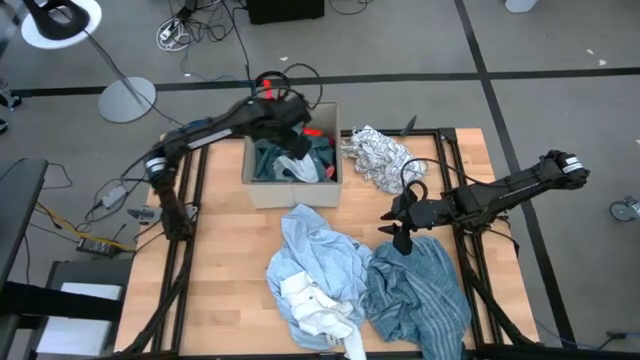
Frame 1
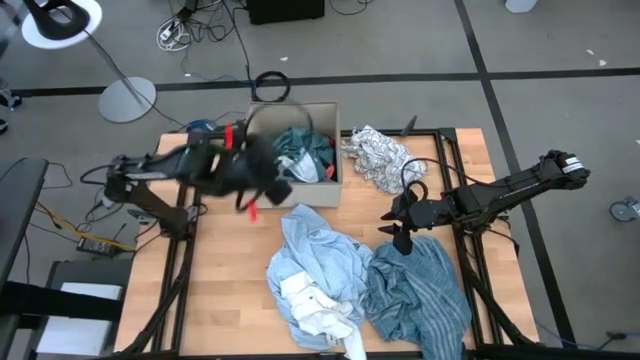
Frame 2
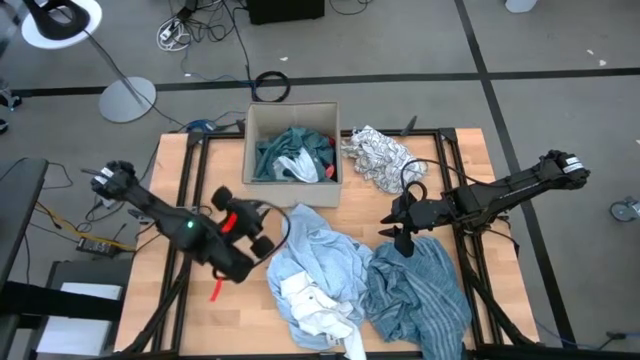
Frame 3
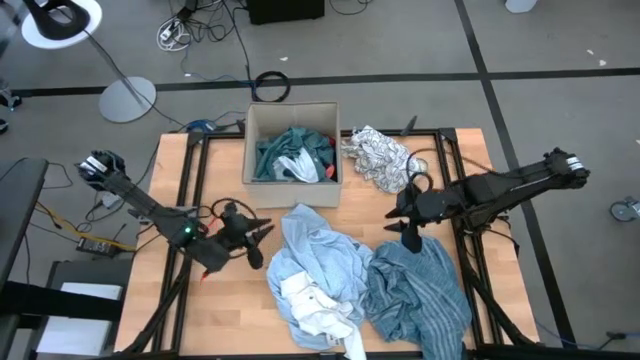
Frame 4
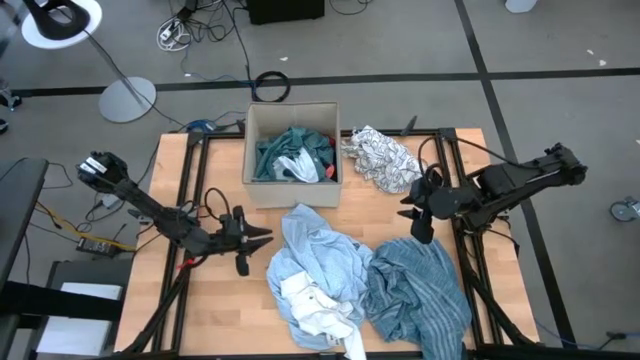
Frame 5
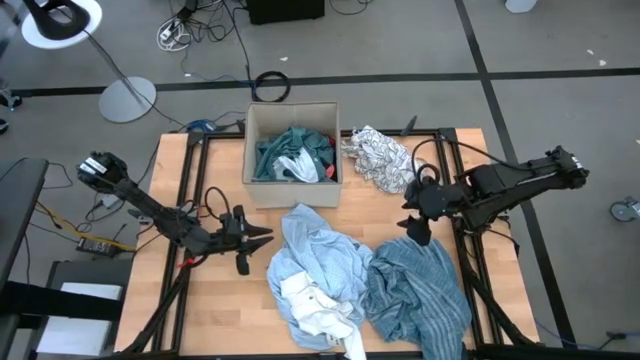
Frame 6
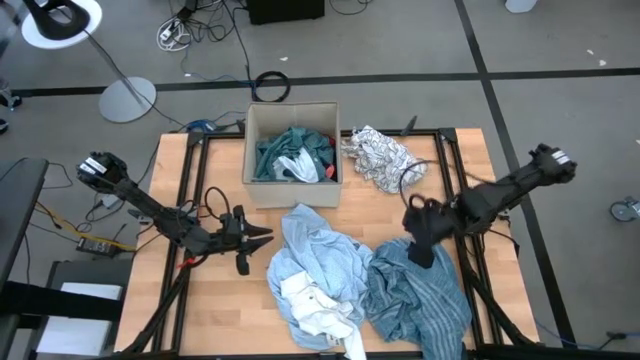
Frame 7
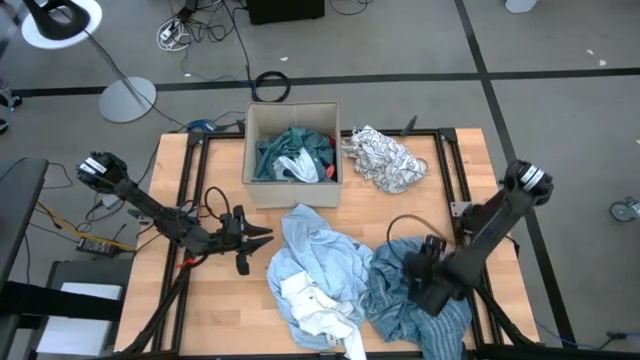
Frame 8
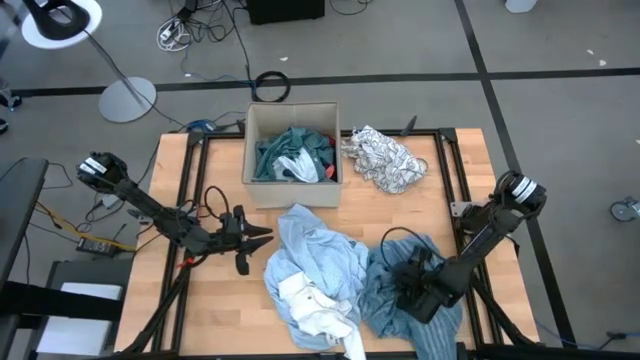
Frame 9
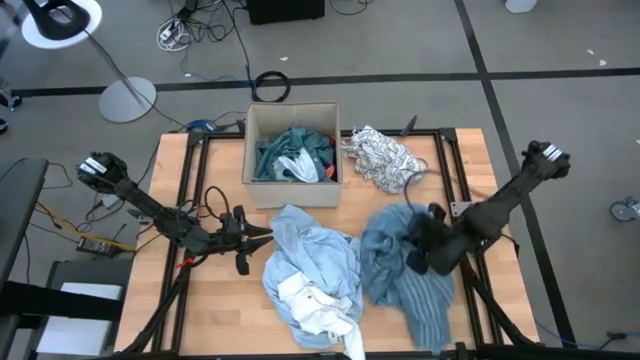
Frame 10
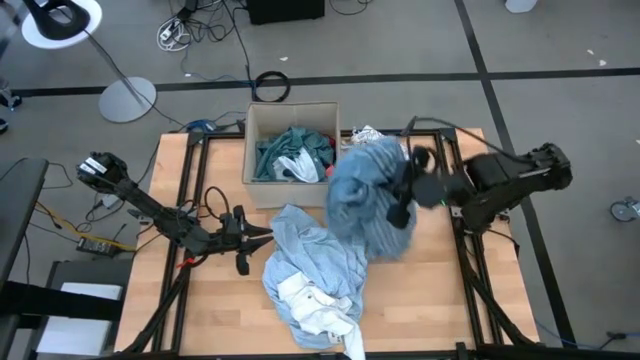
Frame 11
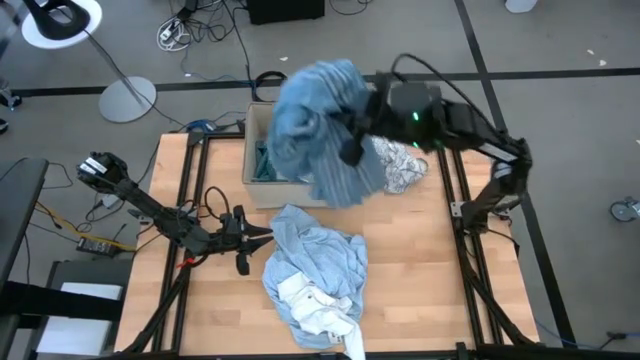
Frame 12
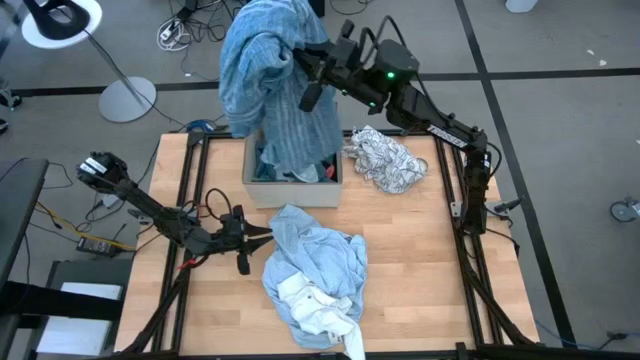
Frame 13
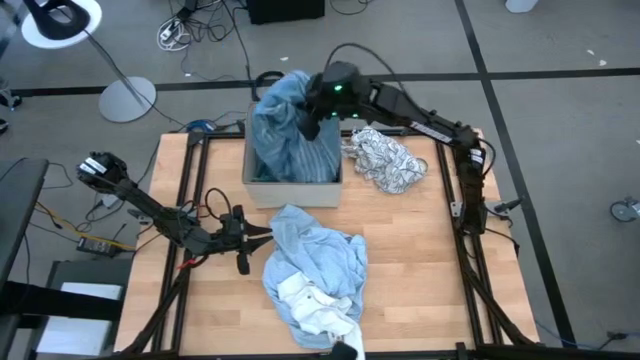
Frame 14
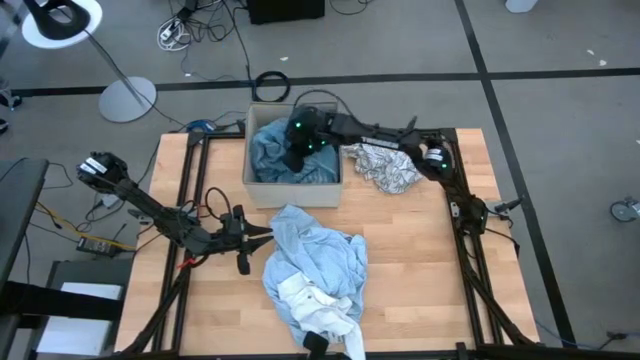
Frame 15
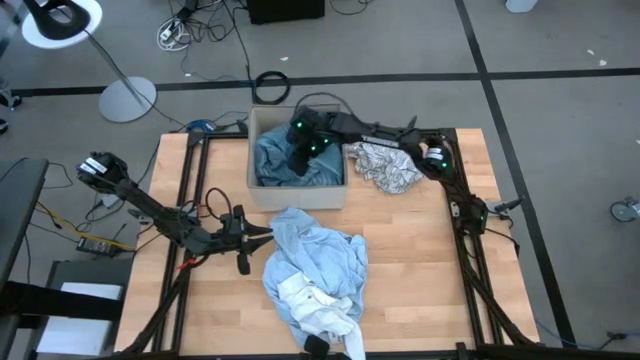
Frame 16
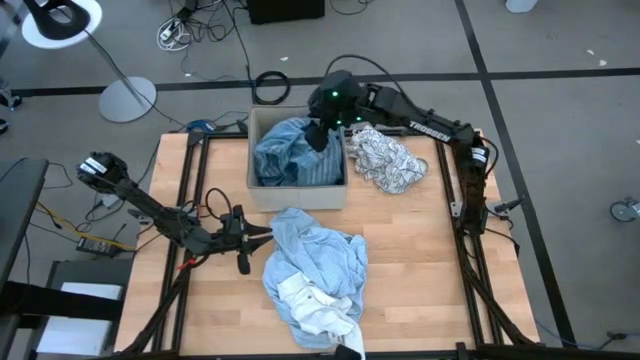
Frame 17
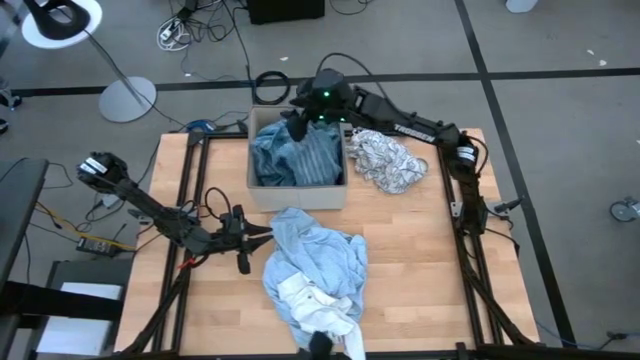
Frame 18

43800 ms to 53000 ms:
Task: Sort clothes
Put the blue cloth into the laundry organizer

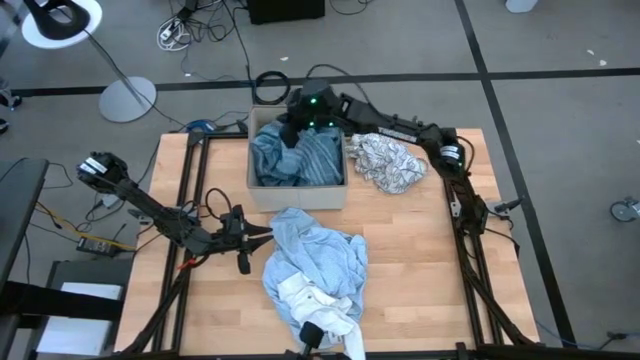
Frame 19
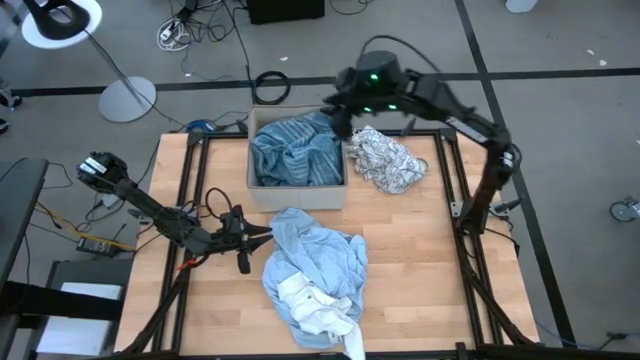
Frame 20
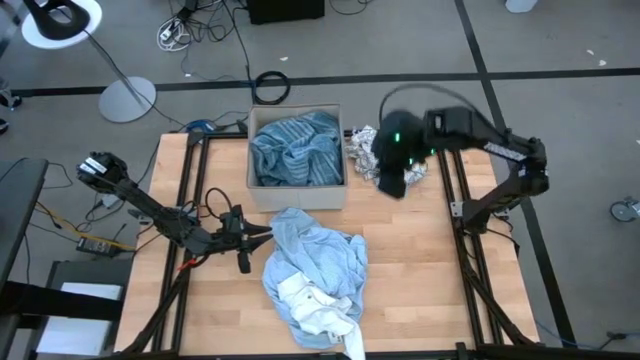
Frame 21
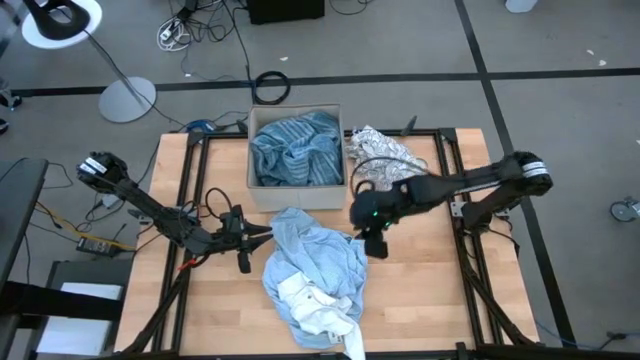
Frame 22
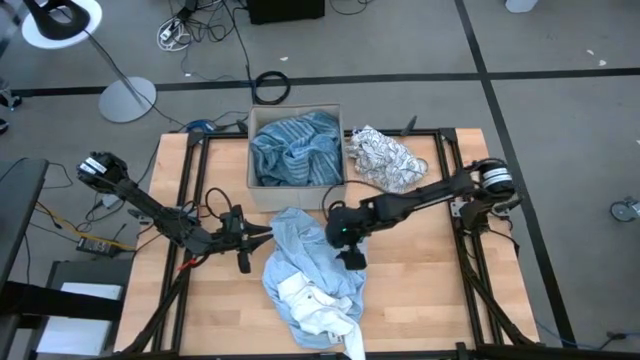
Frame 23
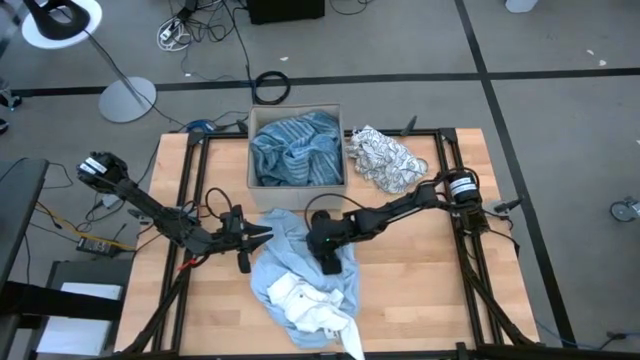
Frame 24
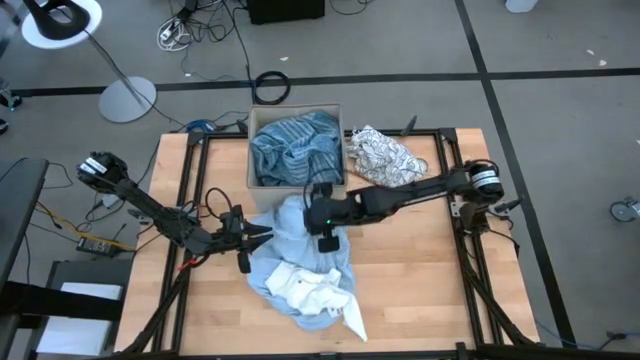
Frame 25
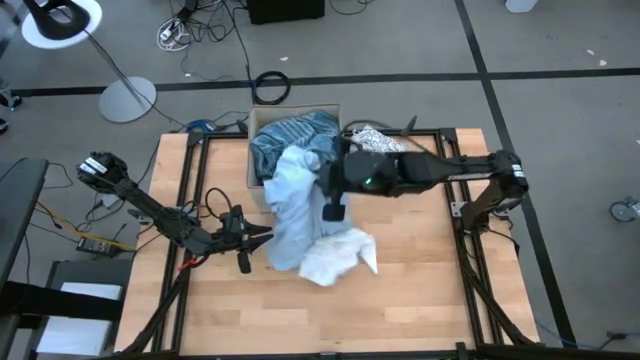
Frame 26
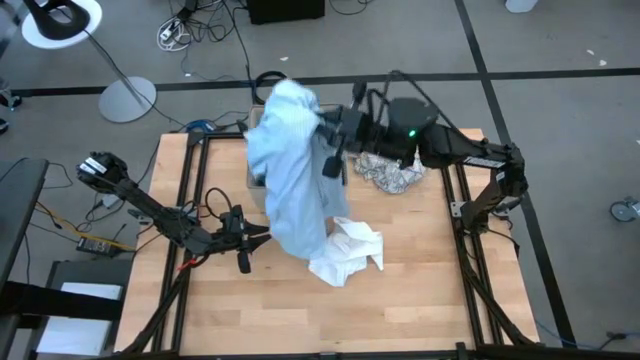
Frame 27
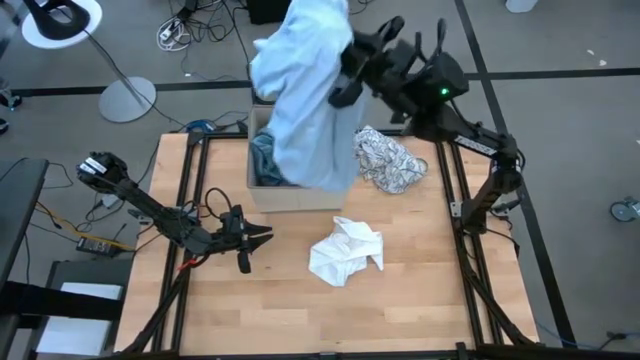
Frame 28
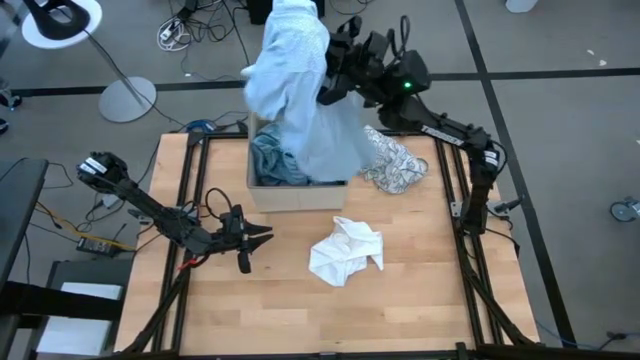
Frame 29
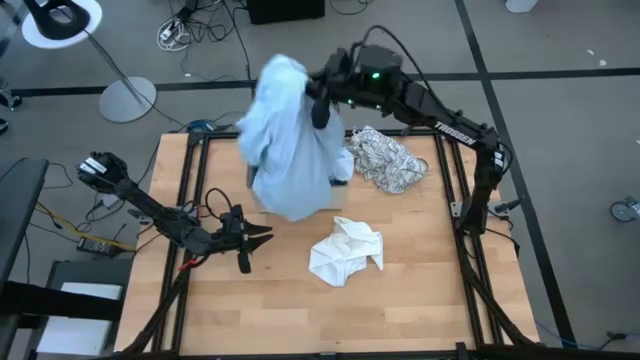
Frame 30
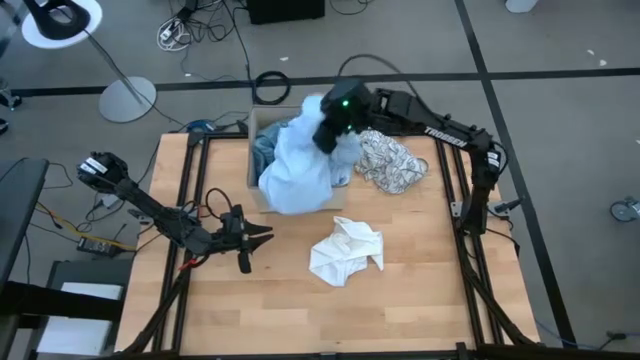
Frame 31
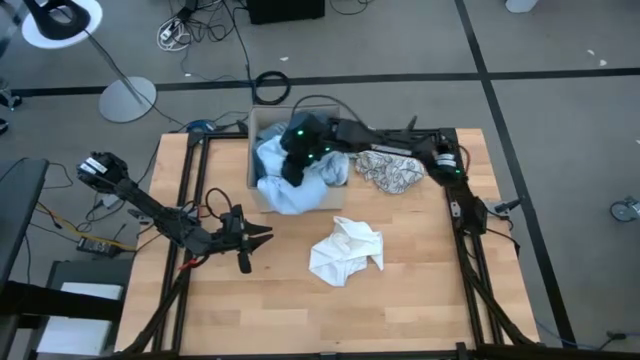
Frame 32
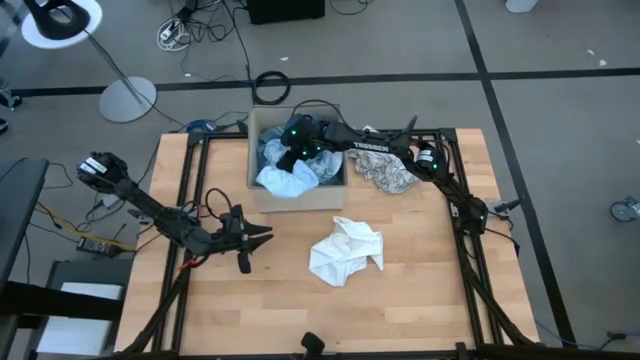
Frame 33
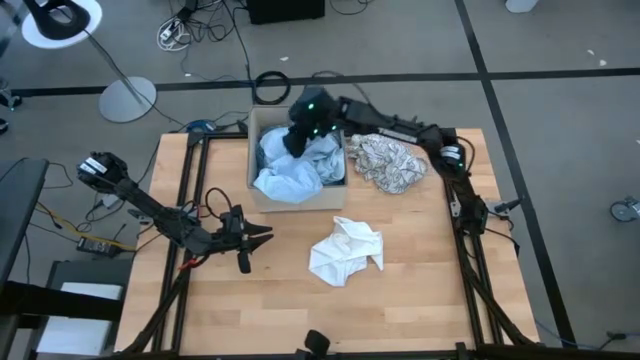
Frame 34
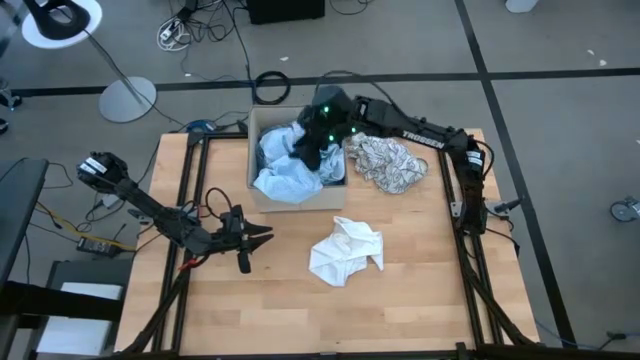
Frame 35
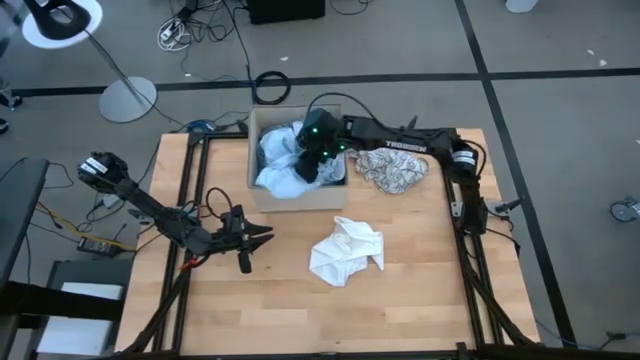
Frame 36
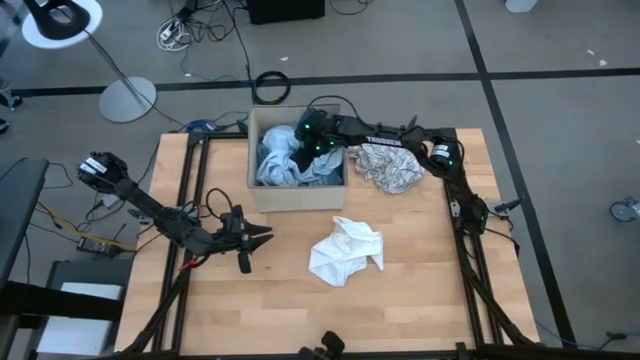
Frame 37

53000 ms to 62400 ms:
Put the light blue cloth into the laundry organizer

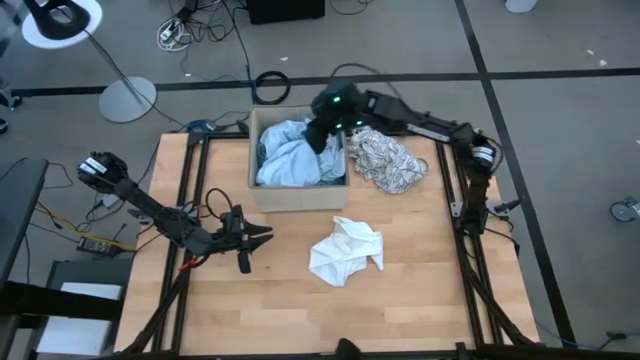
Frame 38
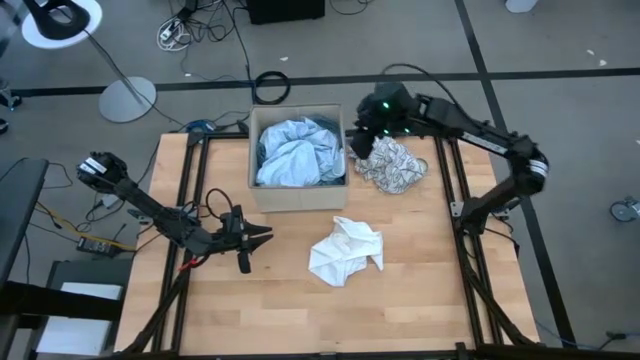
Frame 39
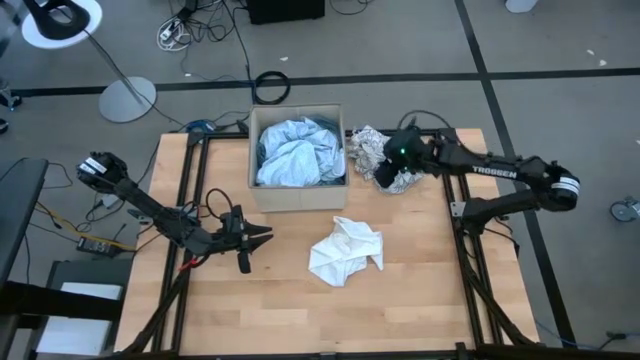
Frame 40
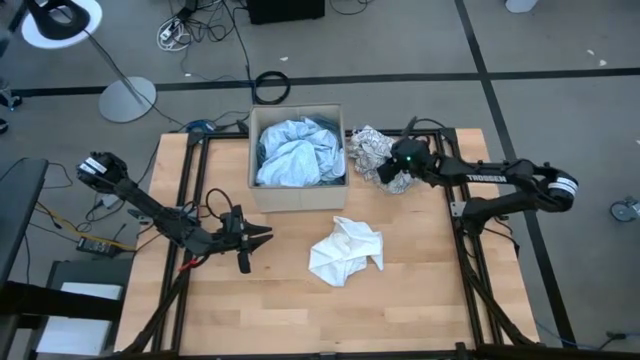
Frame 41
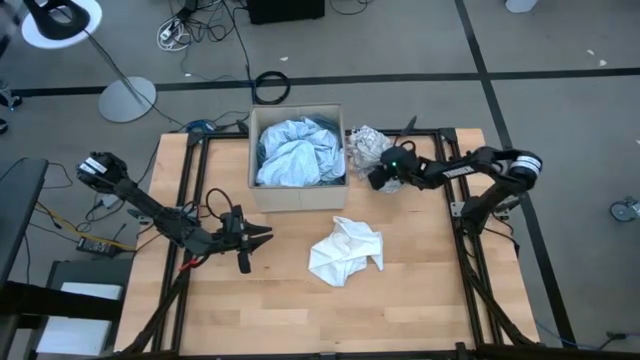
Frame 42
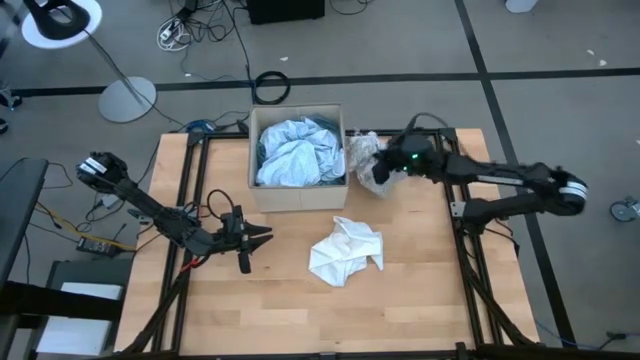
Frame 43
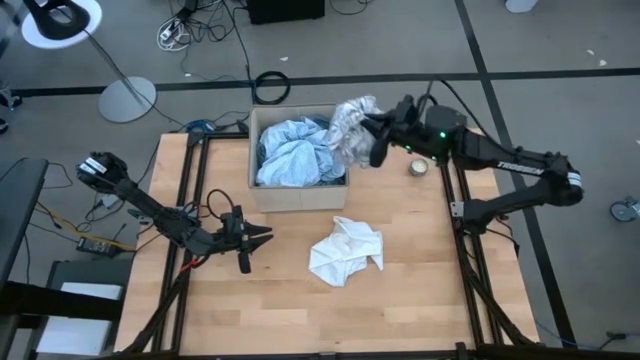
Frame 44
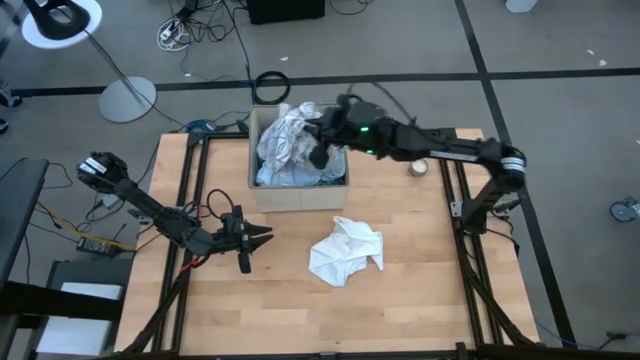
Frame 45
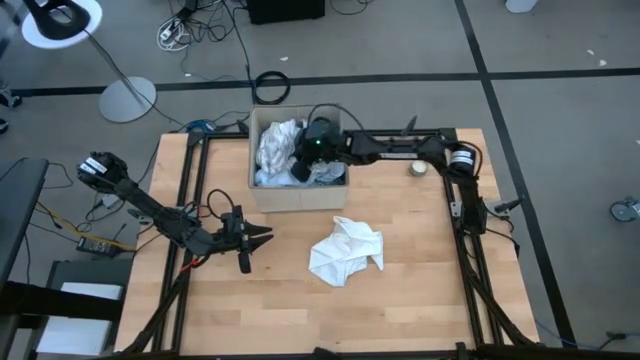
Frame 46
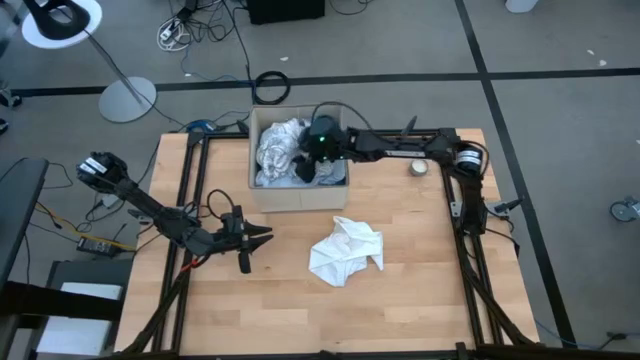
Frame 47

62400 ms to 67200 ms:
Put the white patterned cloth into the laundry organizer
